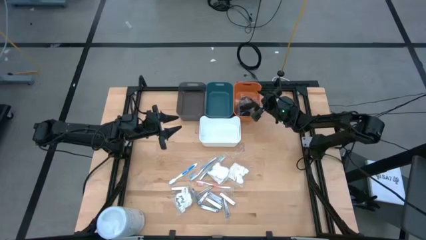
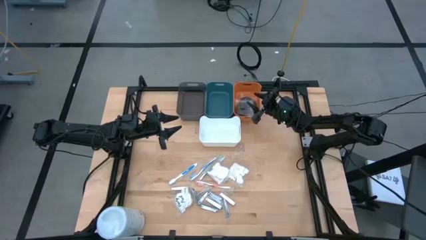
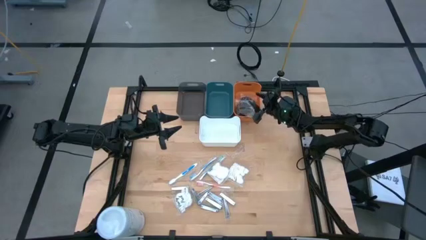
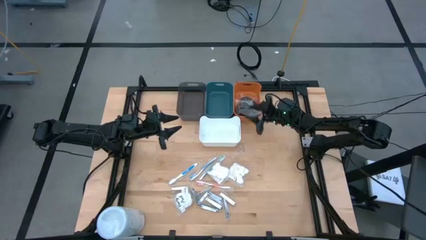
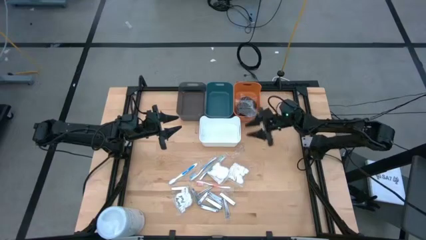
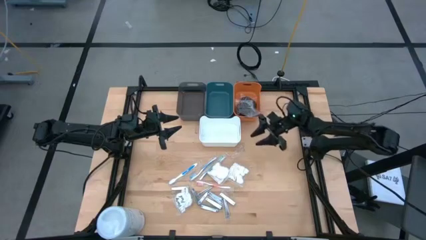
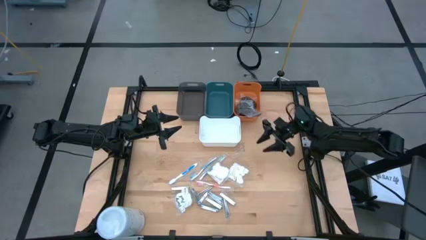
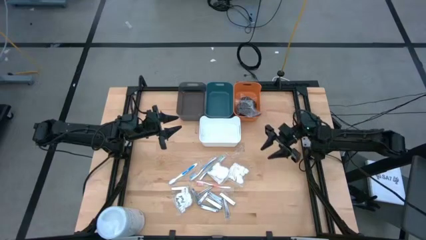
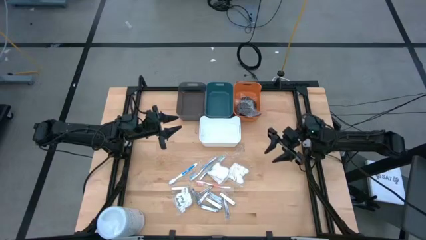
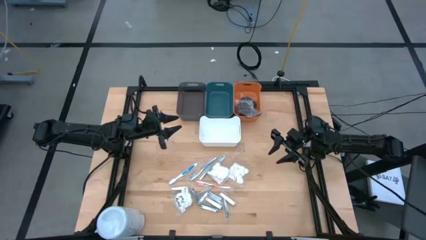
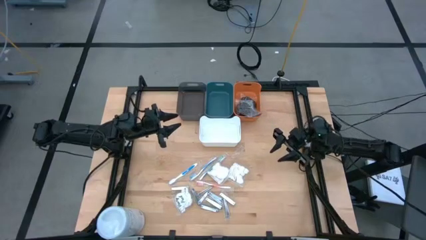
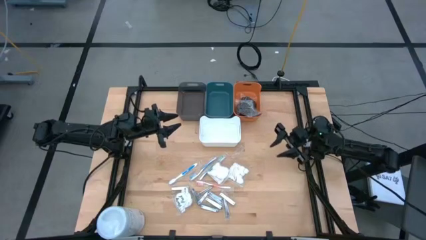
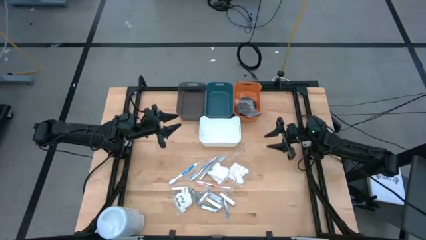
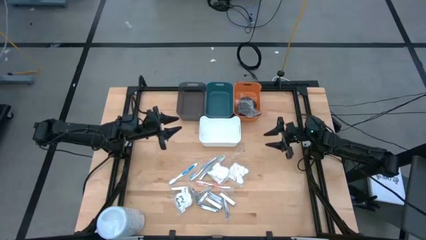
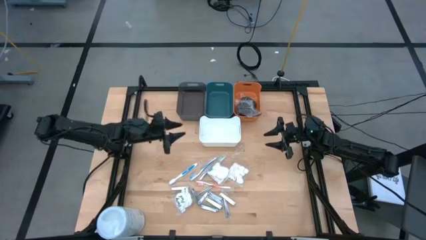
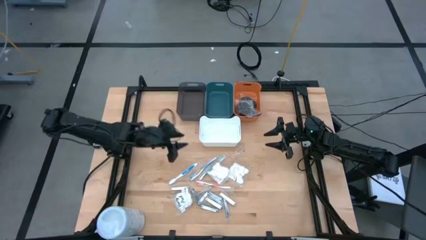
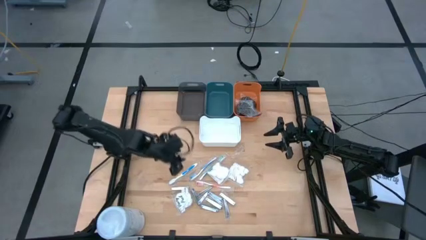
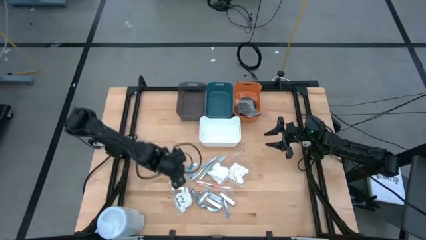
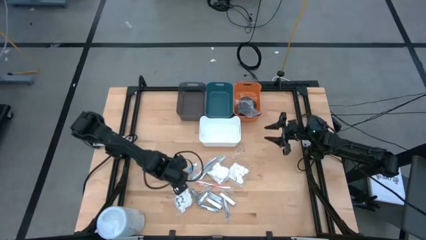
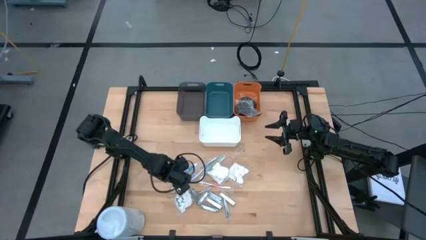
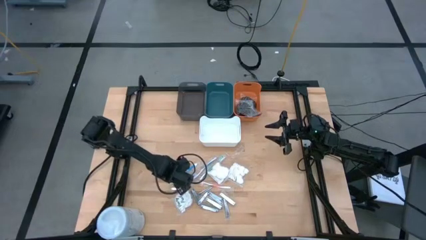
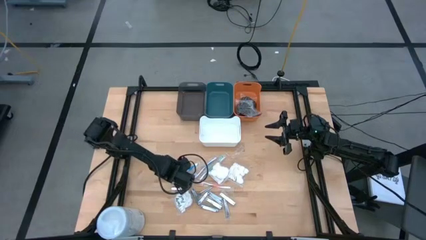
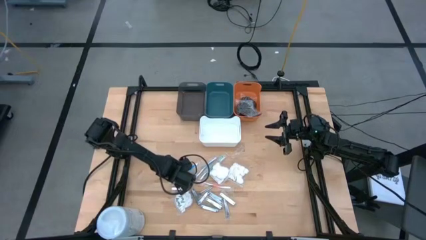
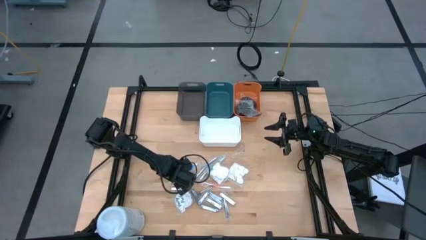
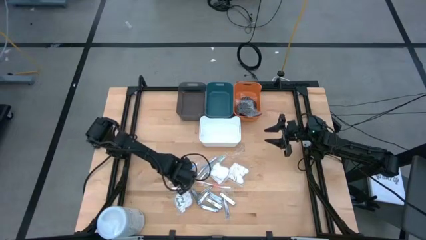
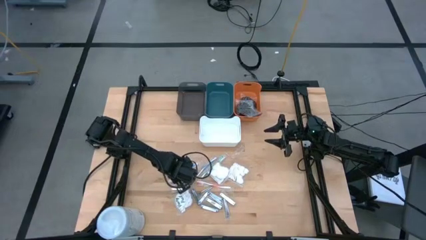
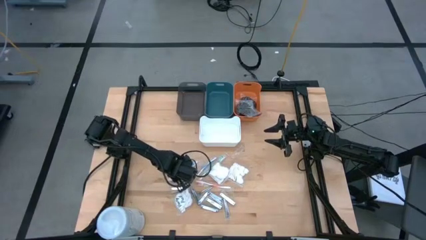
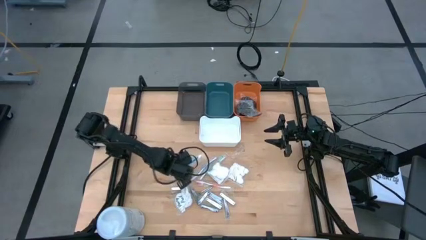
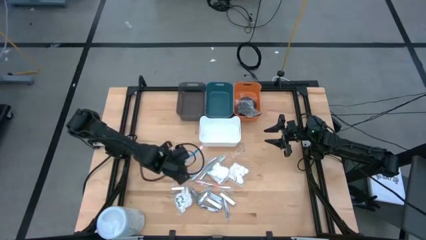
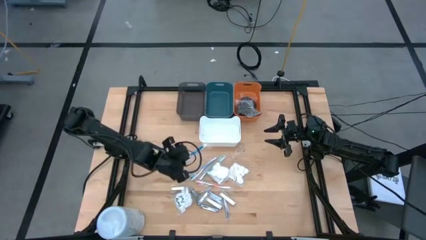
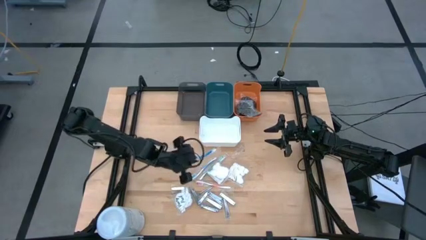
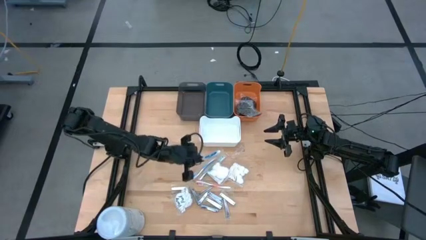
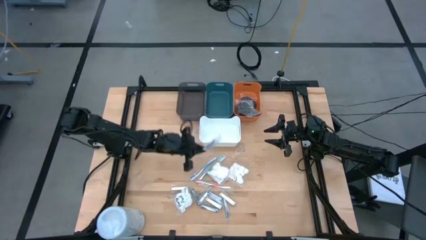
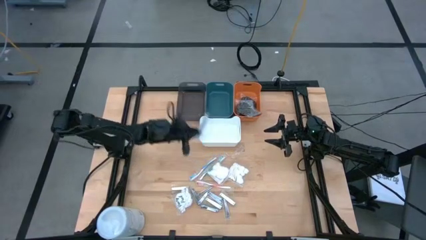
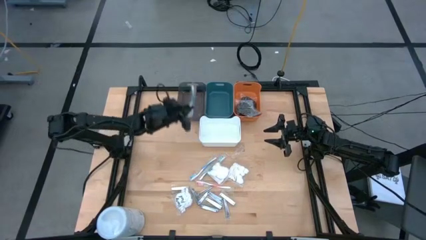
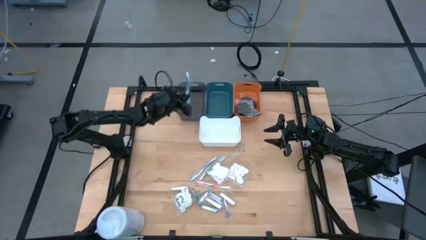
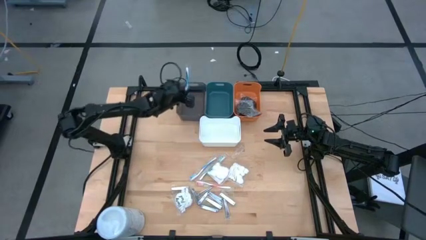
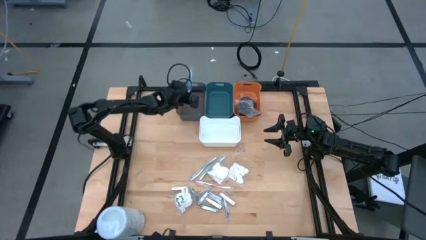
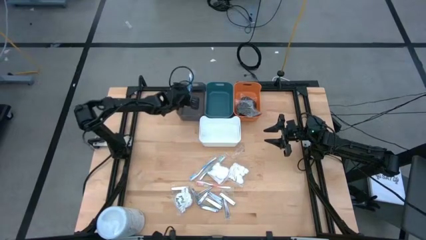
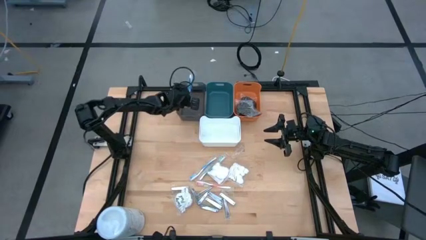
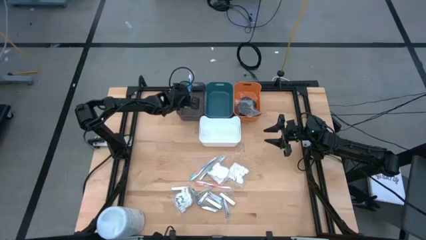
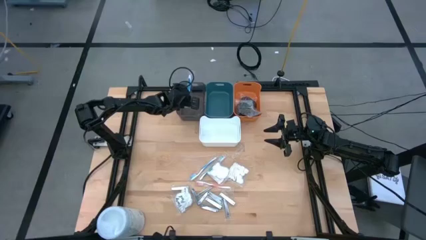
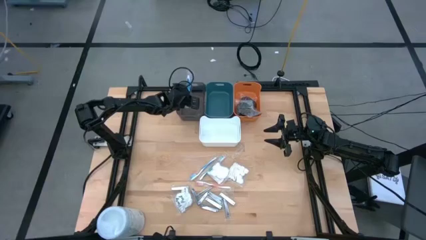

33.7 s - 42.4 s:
Task: Pick & Place Travel size toiletries
Put the blue toothbrush into the black bin

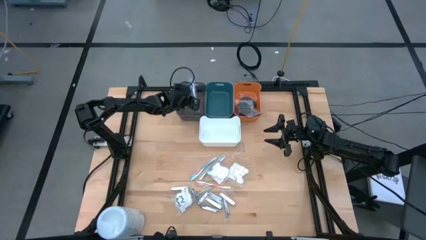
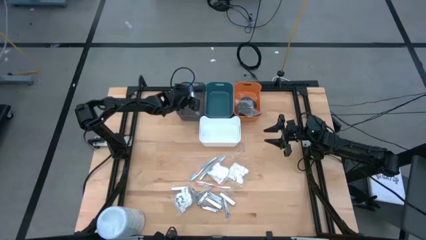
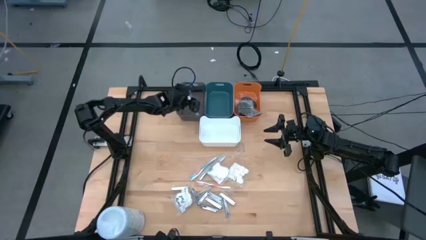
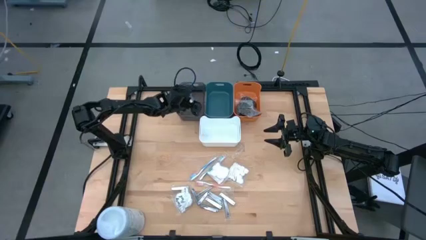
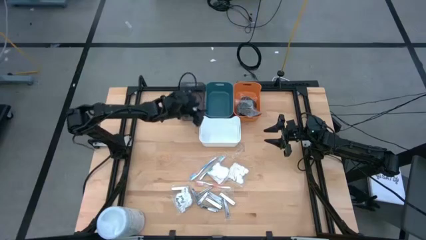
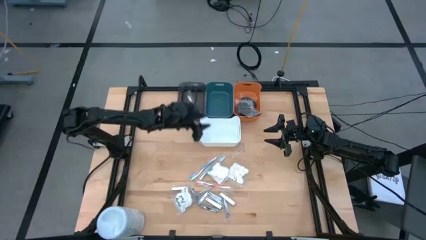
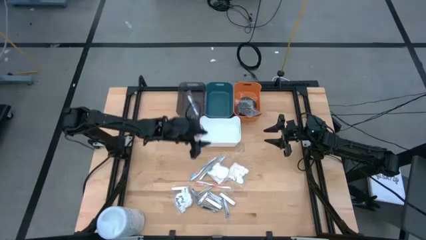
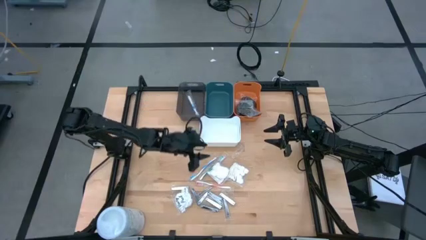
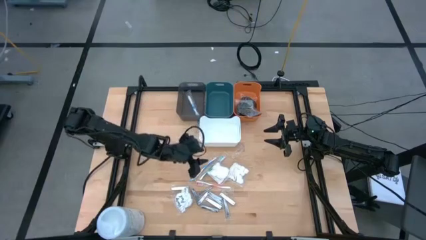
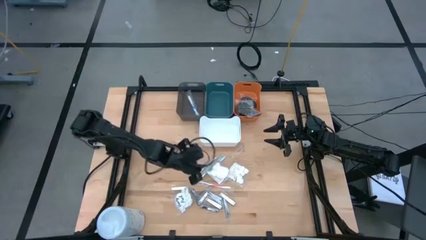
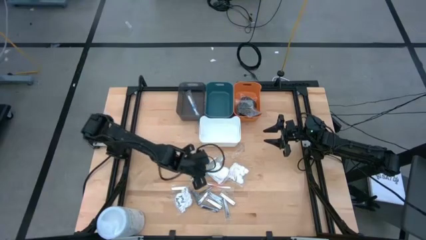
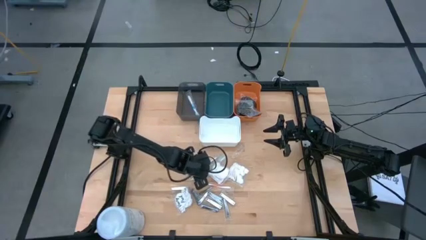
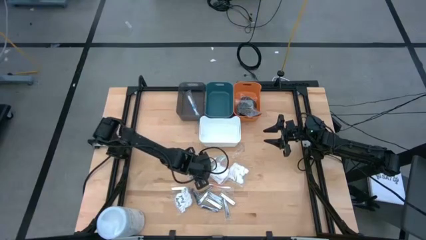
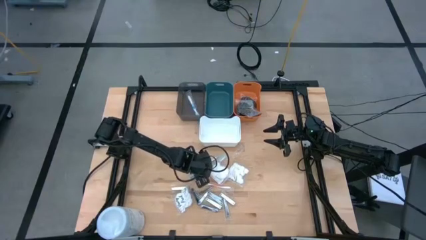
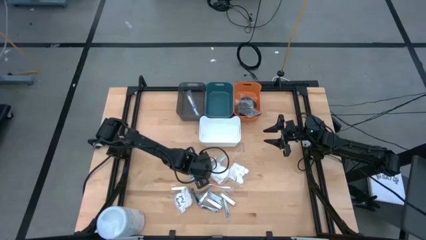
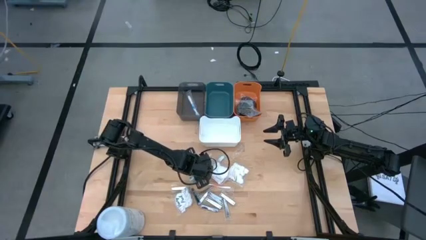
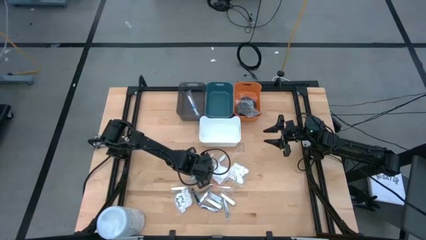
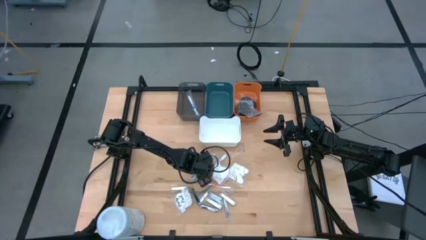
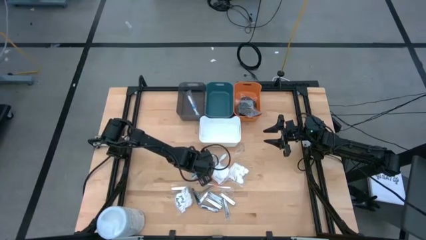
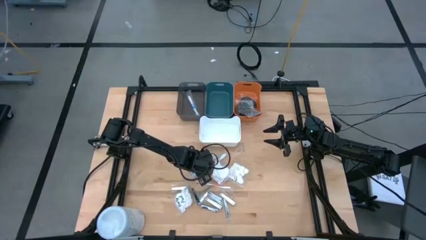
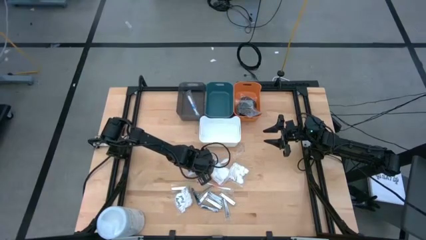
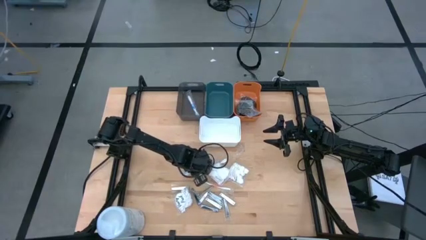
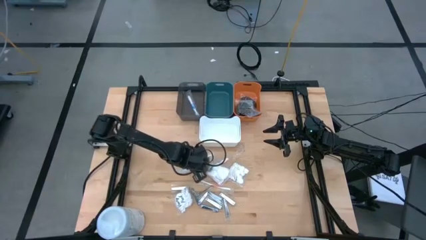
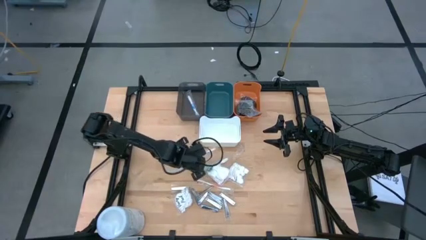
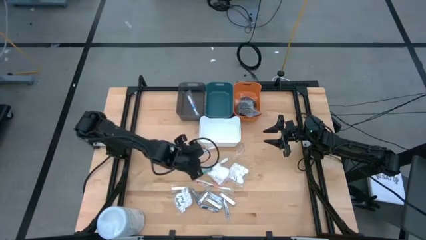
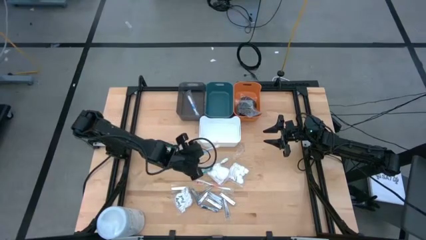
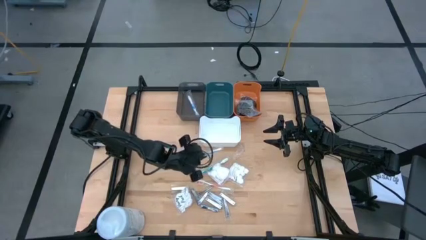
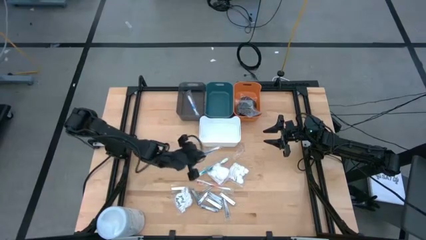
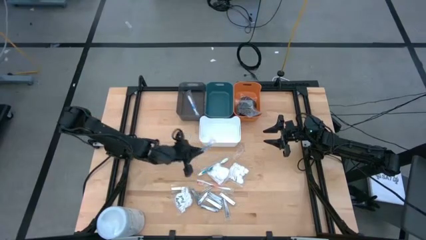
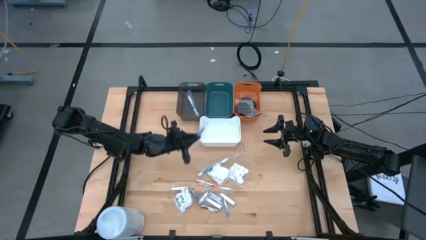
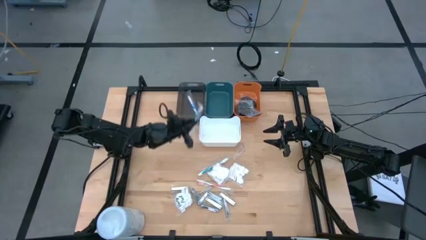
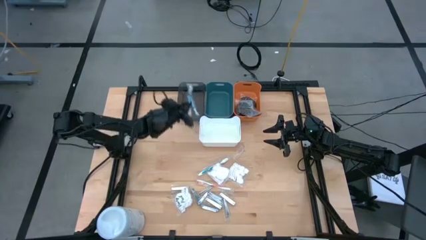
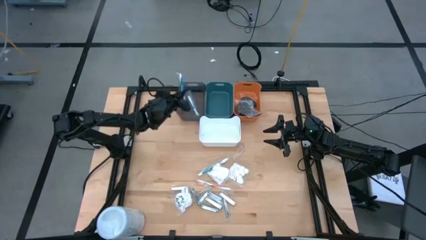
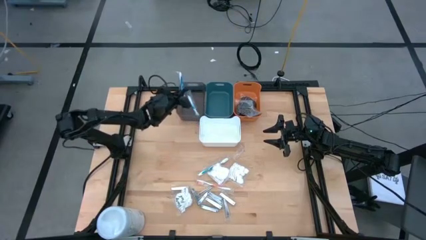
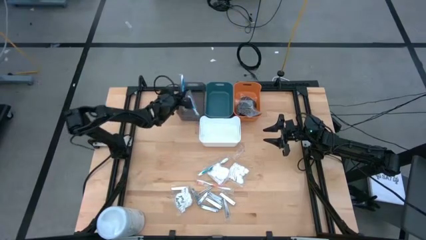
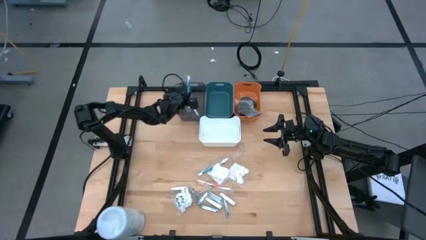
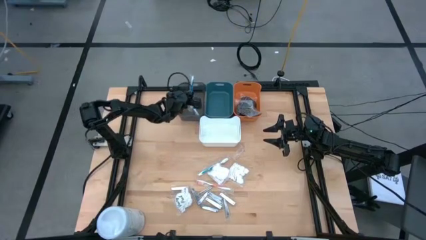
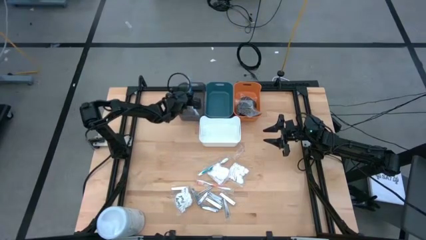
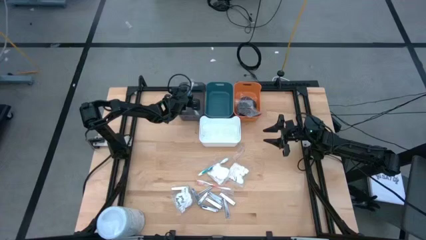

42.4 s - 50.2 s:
Put the blue toothbrush into the black bin
